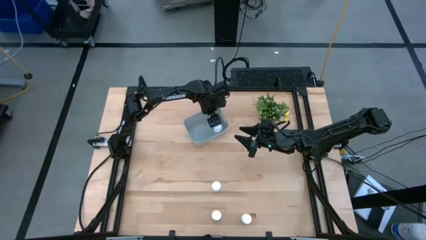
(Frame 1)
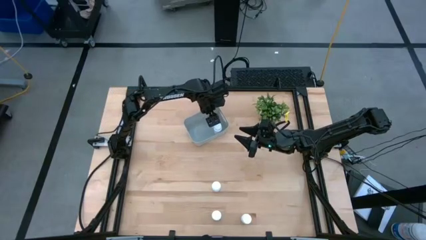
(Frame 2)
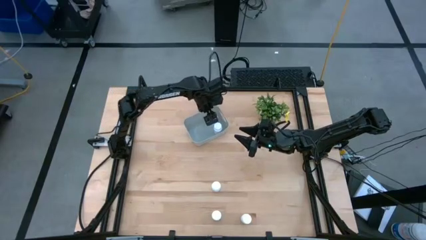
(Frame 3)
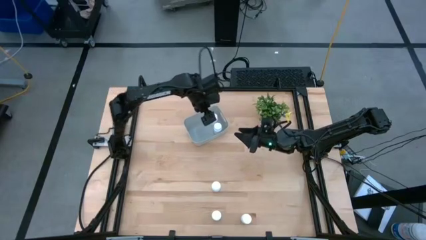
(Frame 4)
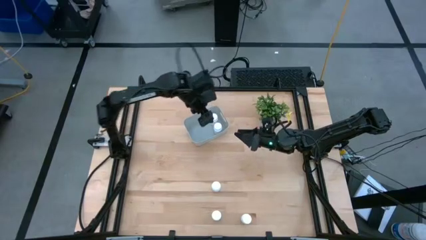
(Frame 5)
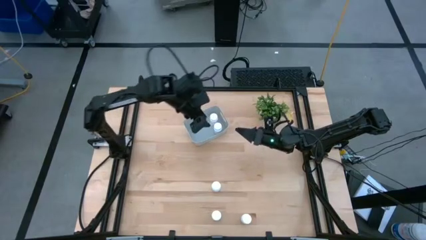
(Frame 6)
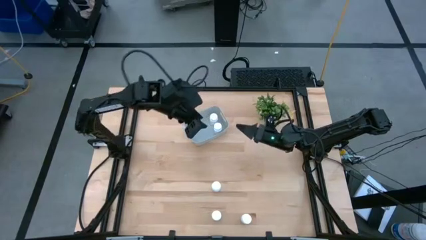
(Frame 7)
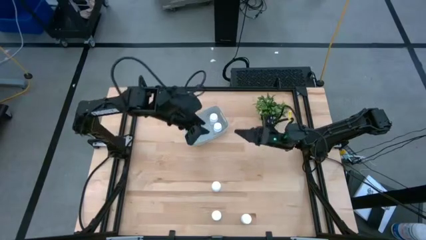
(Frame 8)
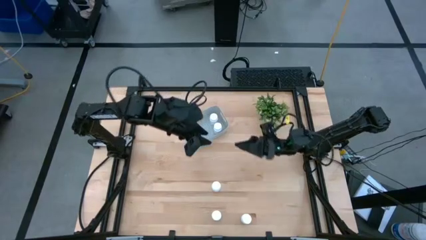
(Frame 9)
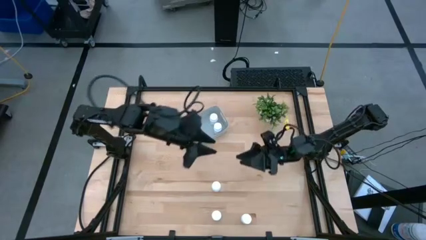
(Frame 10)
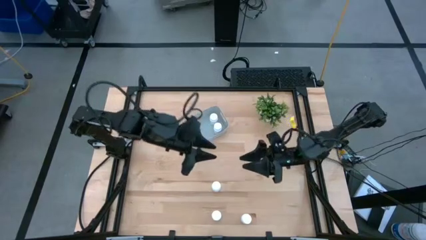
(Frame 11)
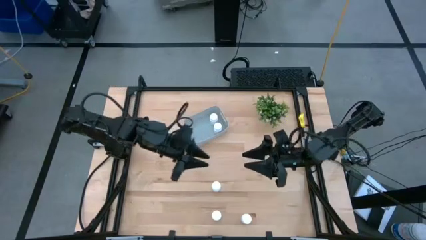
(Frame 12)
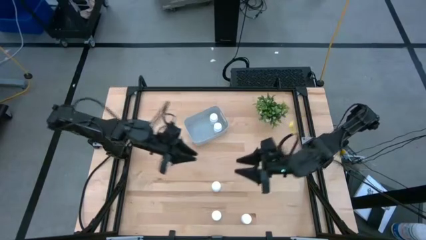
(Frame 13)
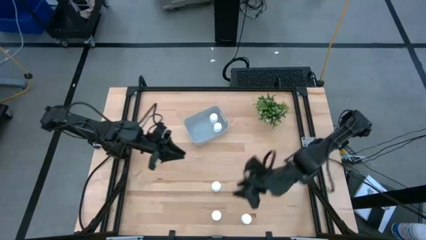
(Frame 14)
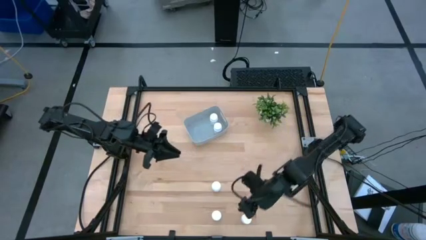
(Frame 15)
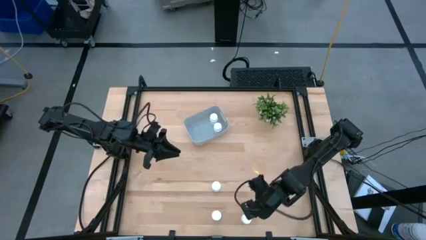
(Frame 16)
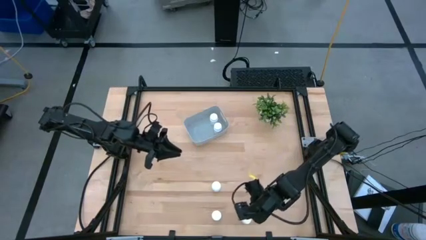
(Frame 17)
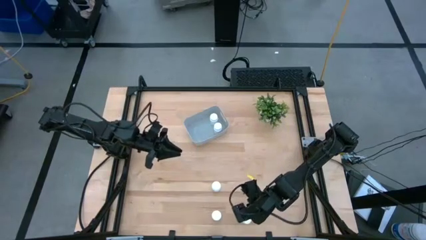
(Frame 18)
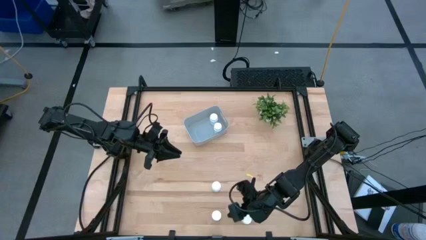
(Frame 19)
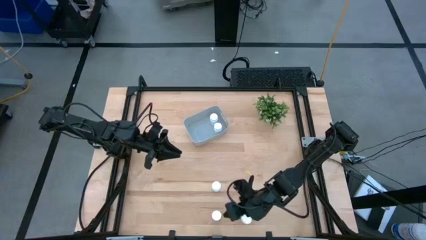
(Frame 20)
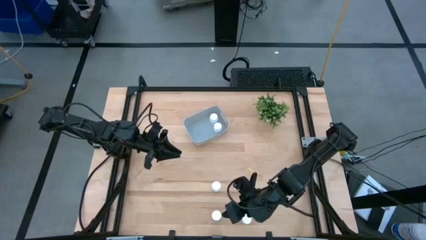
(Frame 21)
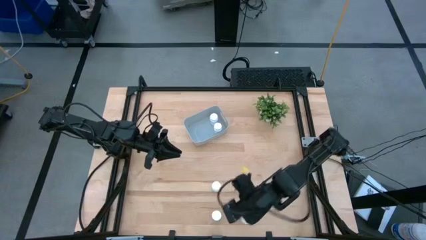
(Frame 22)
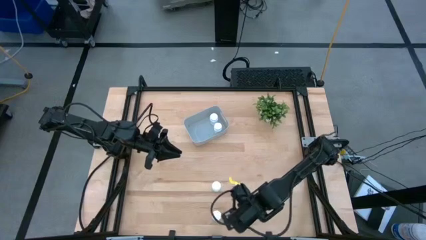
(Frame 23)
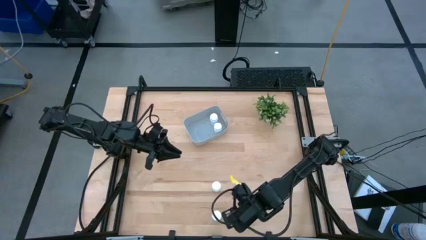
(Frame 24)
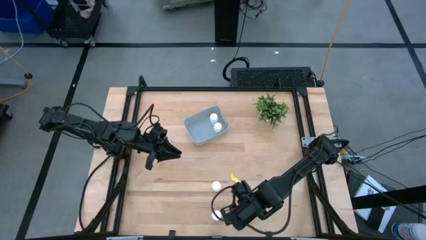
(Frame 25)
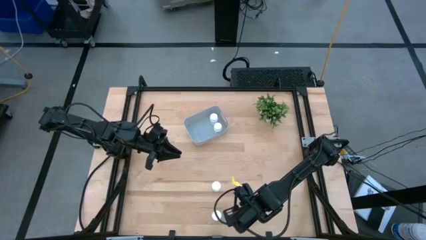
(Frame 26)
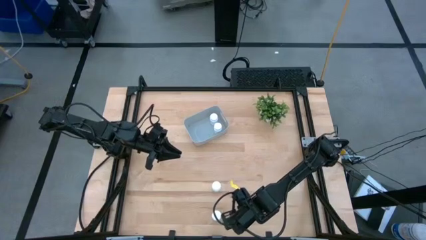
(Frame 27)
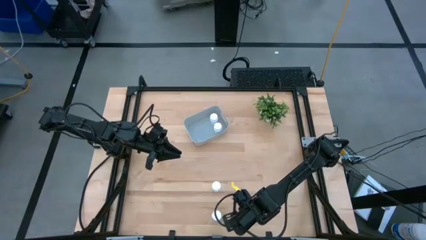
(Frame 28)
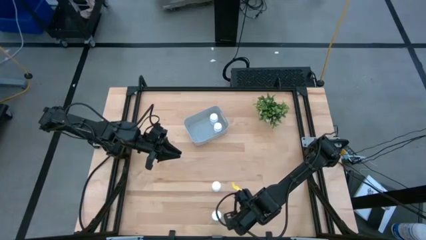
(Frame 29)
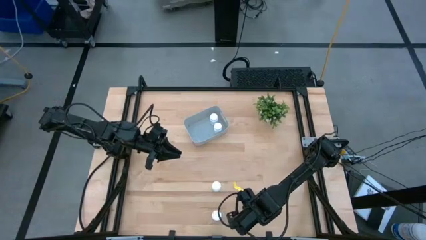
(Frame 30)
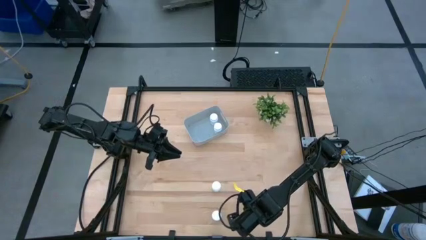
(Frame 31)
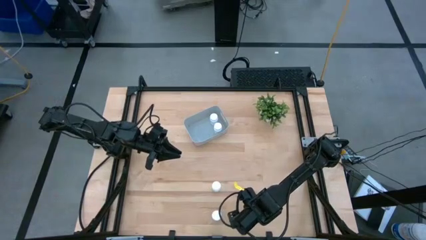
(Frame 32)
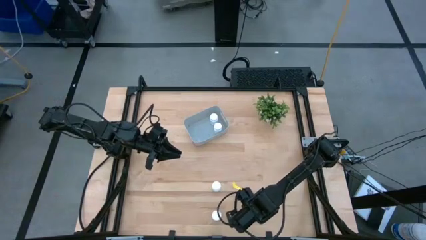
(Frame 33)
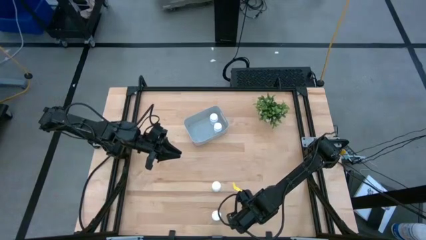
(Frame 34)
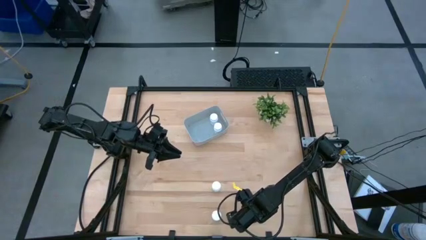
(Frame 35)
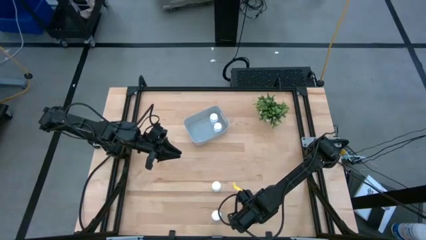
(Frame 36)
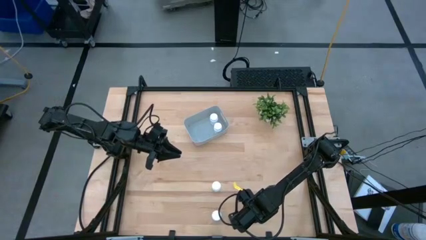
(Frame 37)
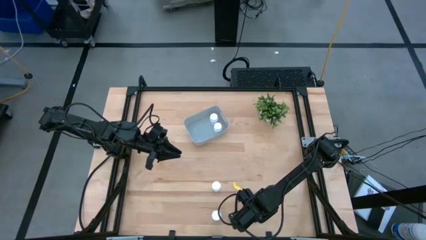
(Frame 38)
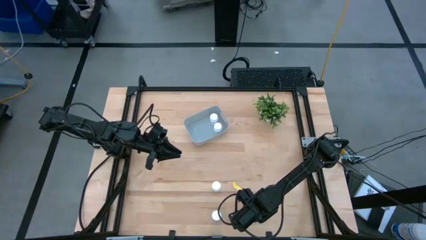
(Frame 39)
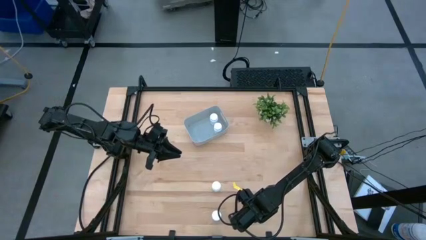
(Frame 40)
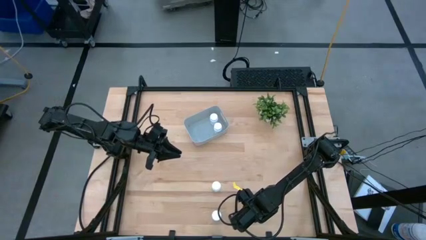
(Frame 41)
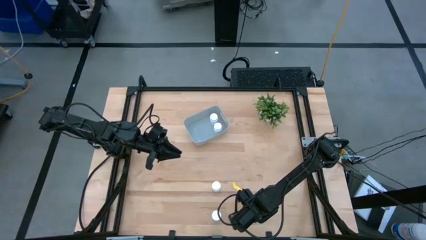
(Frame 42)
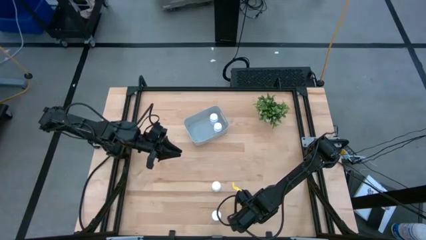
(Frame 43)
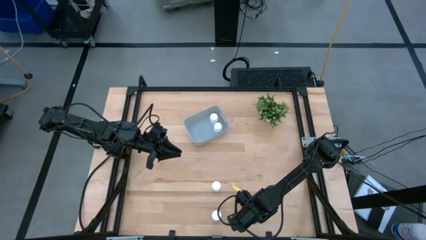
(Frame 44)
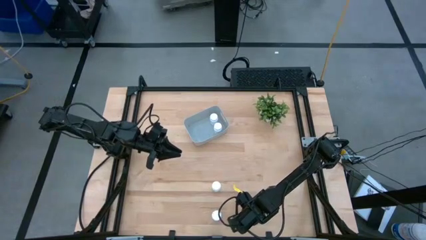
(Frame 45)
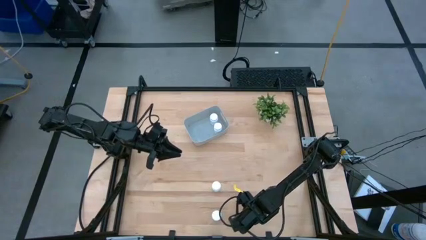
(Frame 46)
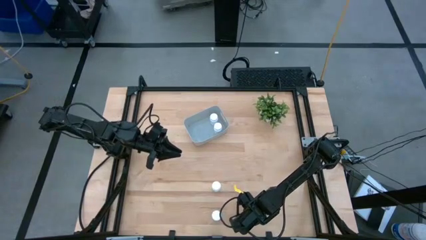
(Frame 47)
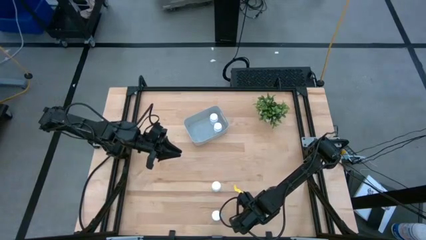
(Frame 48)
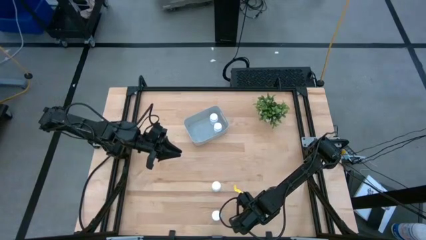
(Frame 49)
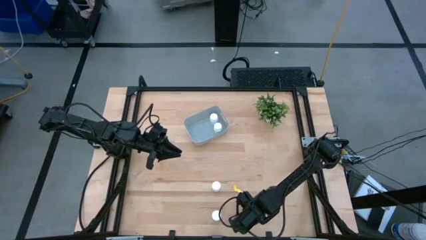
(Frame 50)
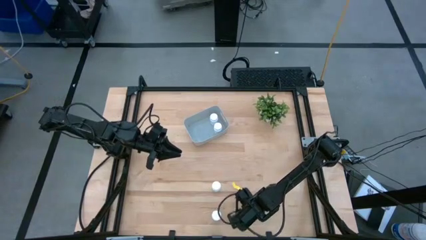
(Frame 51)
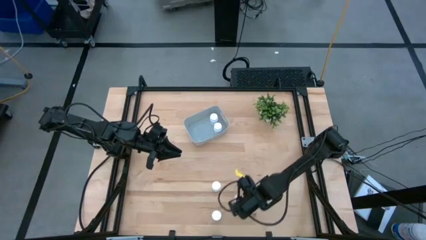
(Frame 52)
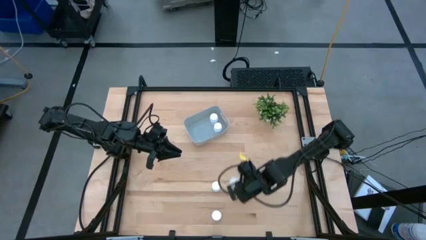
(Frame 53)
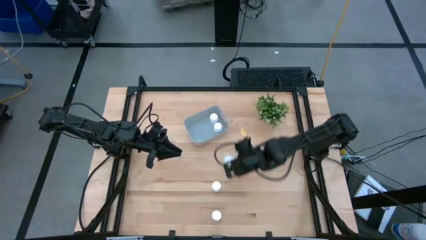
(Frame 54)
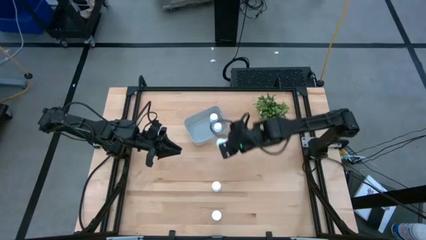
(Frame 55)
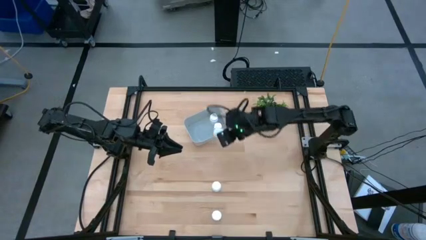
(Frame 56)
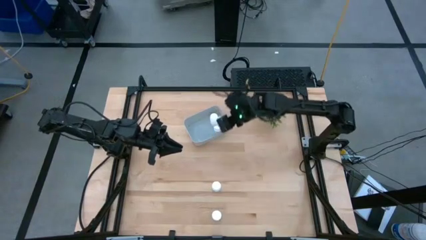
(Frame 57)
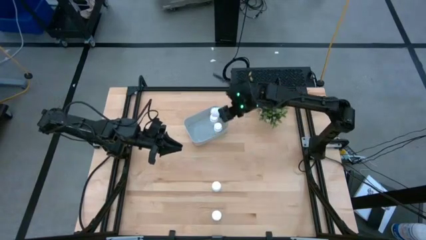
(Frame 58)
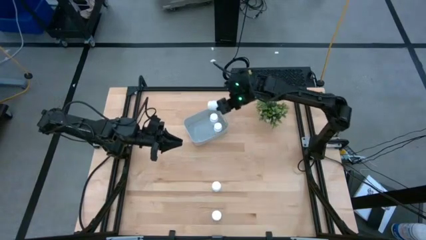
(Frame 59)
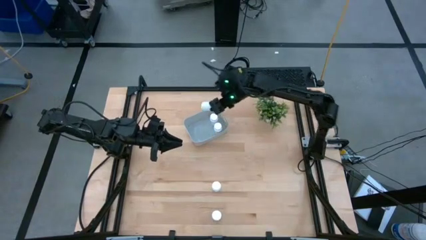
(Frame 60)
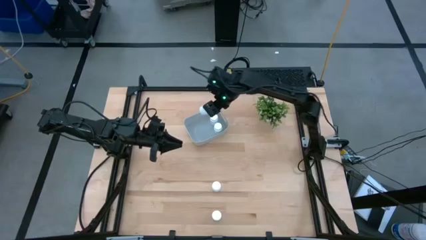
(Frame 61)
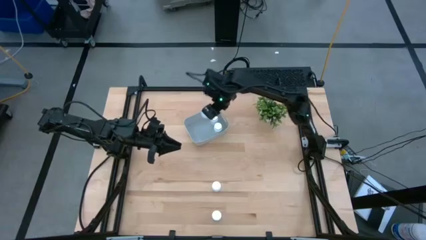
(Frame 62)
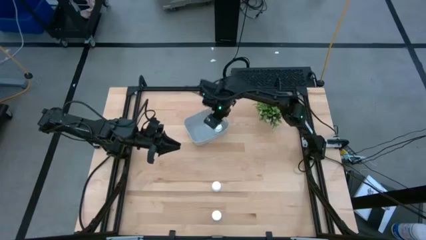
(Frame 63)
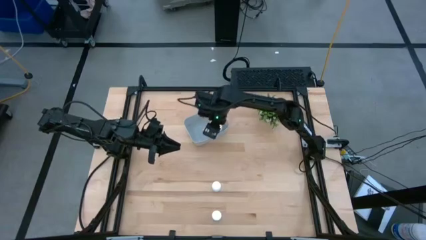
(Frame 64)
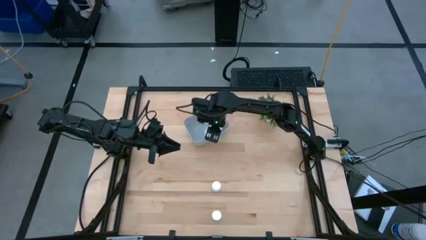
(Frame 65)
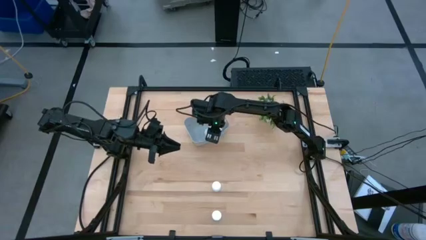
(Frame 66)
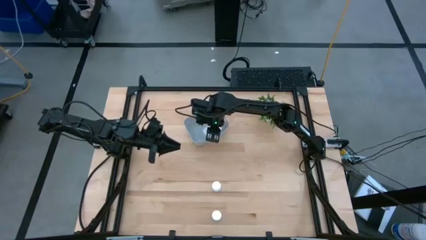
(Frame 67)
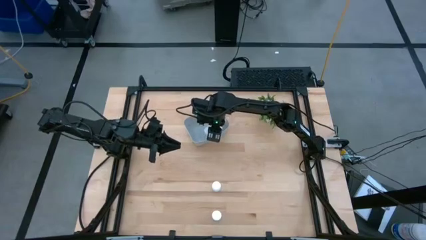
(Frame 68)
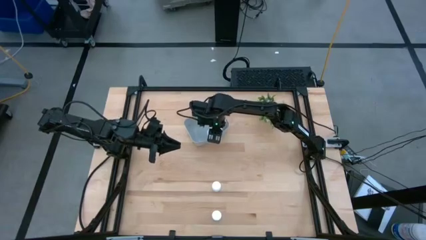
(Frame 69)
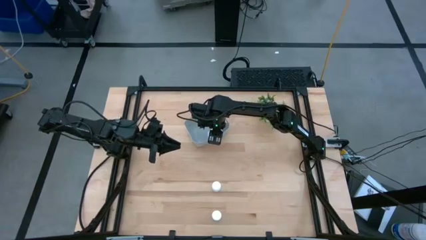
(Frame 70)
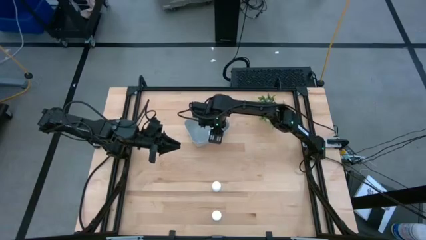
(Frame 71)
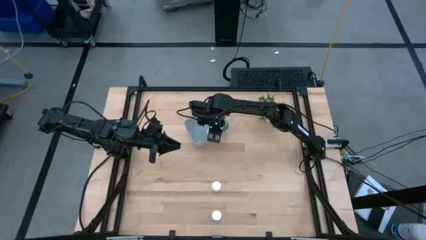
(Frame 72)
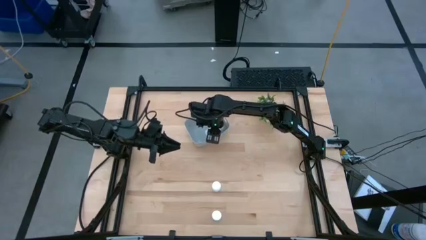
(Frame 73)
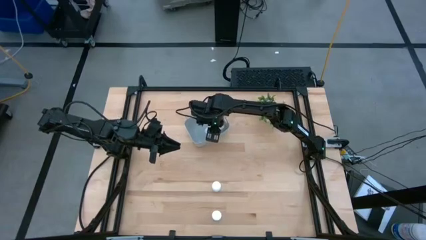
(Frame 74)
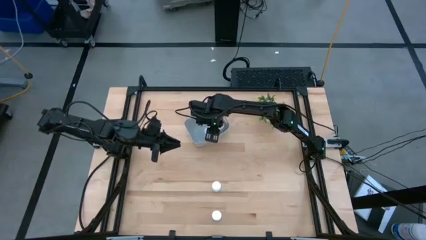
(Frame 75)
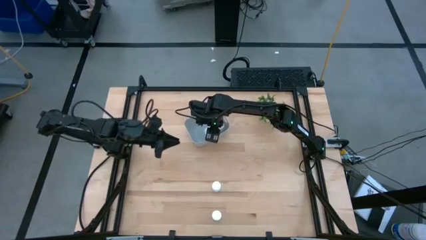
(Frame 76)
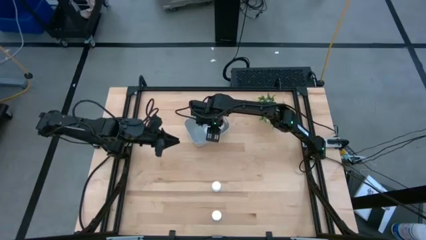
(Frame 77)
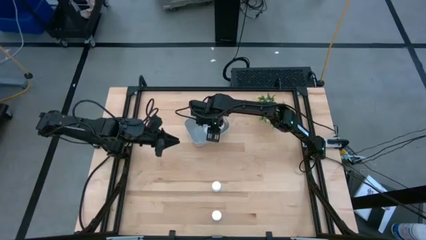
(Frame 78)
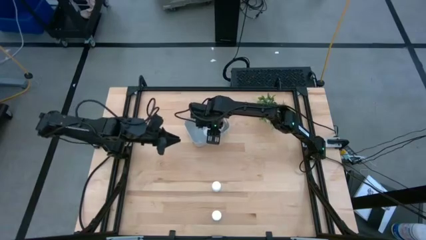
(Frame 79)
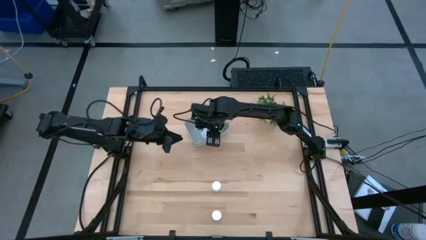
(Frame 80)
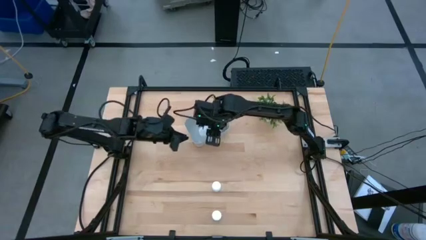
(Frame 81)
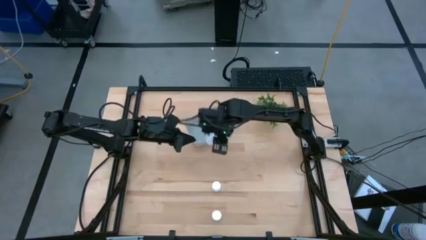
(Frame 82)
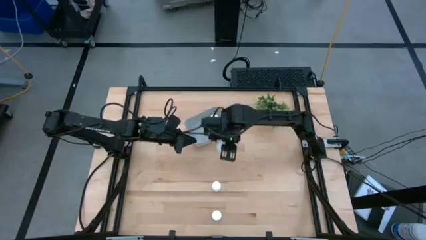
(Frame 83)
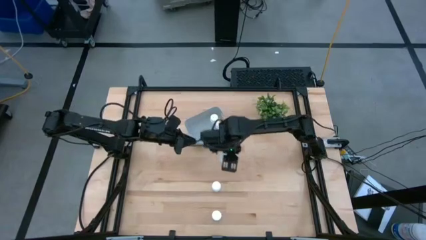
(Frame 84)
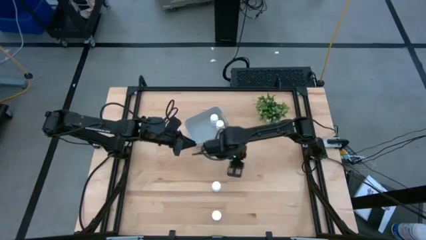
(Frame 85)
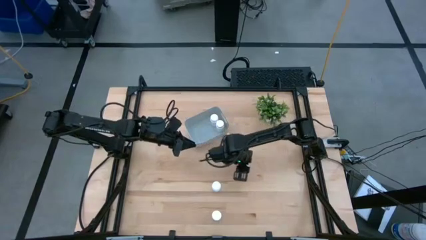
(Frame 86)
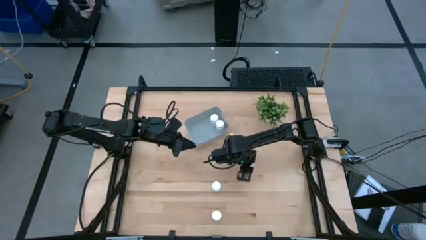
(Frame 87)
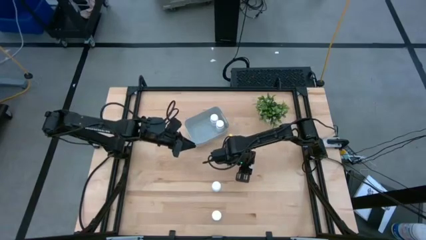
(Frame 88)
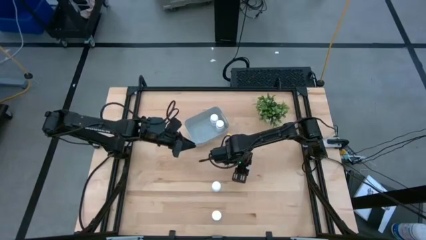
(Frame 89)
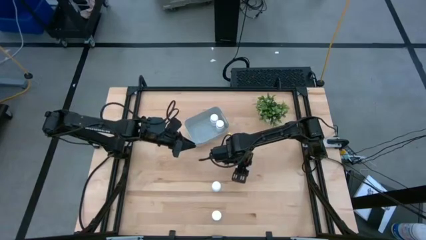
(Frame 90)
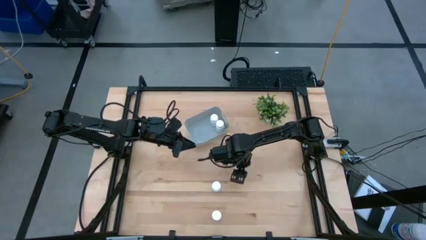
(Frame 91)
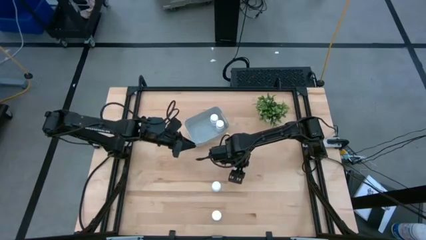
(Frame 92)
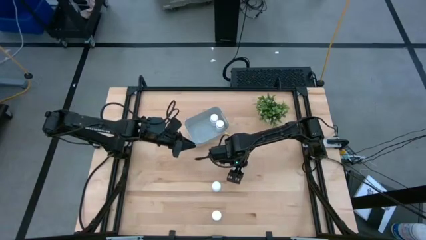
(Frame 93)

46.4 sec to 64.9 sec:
Task: Pick and place pill bottles into a basket
Put the white pill bottle into the gray bin
